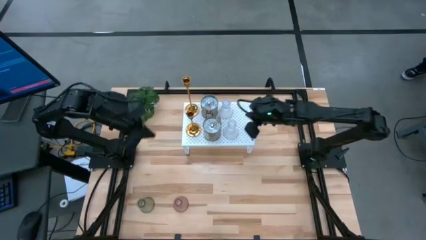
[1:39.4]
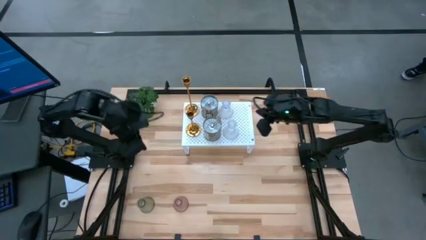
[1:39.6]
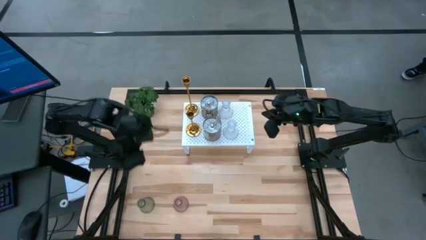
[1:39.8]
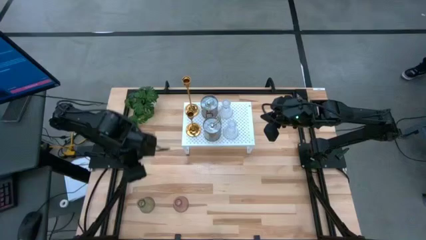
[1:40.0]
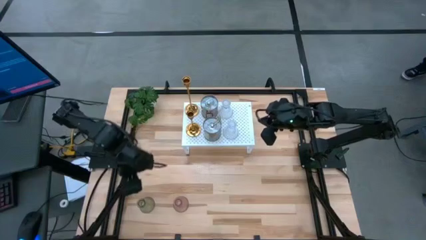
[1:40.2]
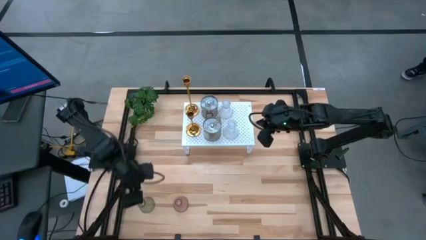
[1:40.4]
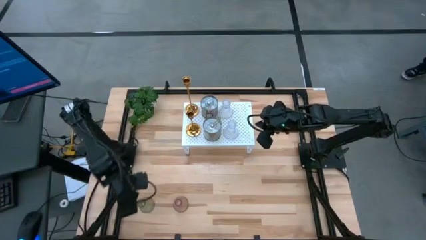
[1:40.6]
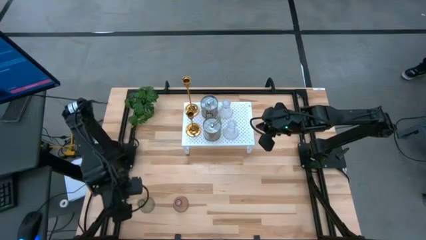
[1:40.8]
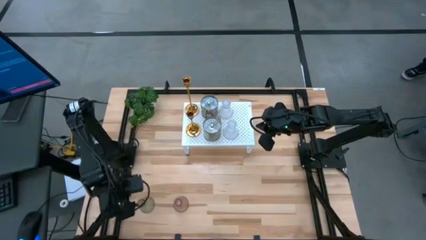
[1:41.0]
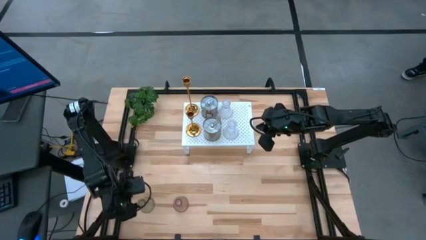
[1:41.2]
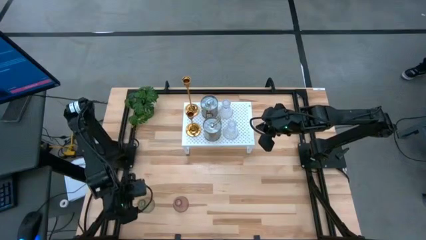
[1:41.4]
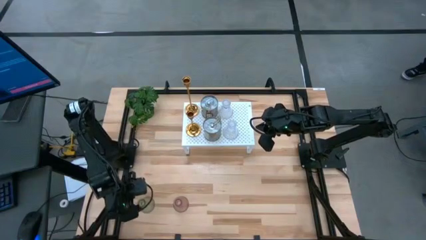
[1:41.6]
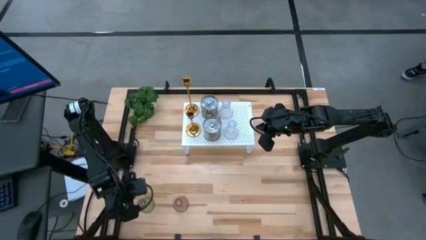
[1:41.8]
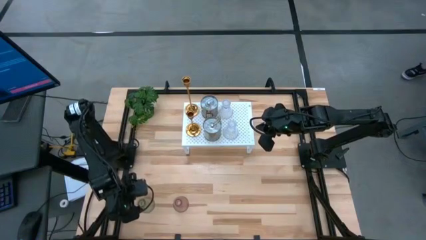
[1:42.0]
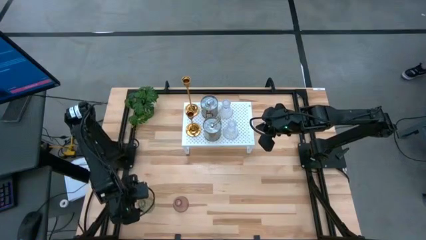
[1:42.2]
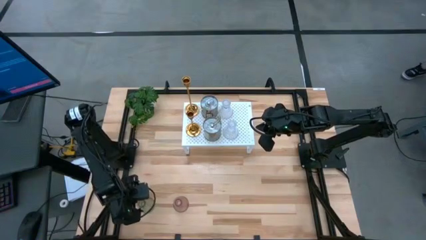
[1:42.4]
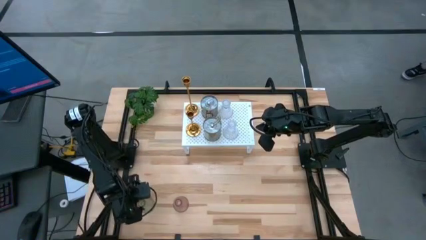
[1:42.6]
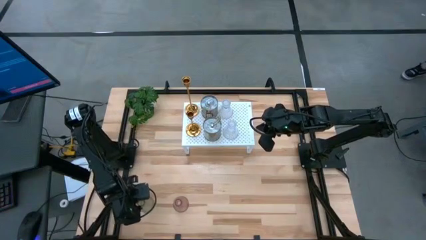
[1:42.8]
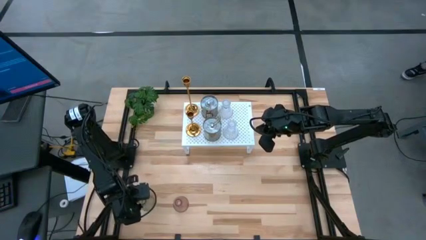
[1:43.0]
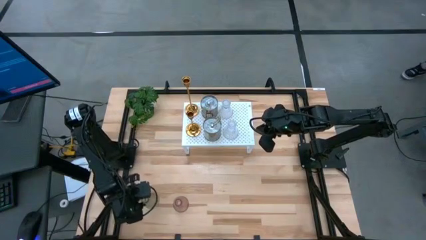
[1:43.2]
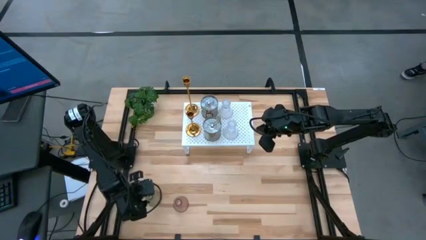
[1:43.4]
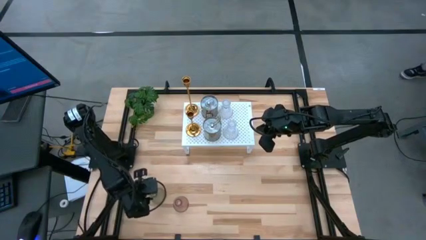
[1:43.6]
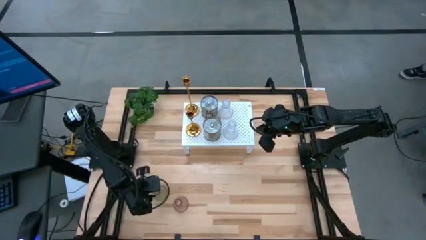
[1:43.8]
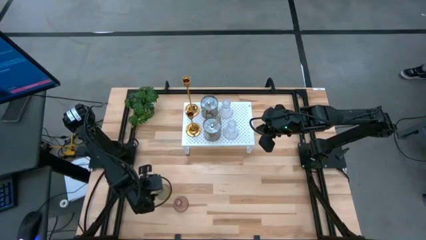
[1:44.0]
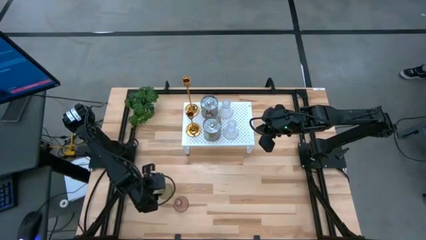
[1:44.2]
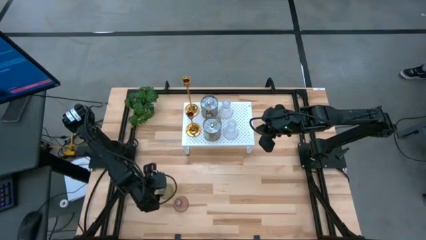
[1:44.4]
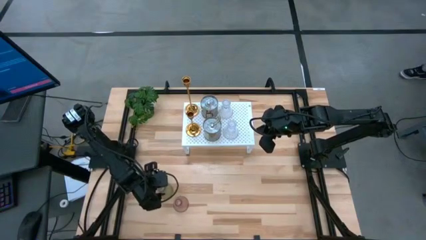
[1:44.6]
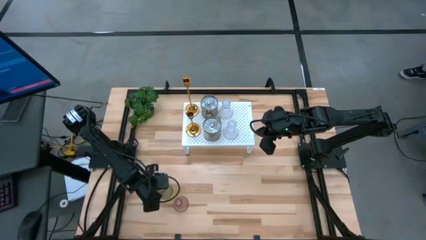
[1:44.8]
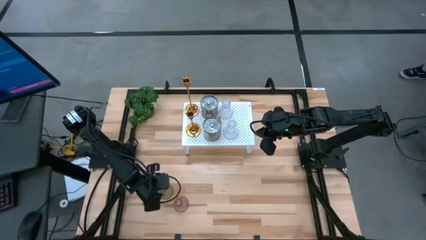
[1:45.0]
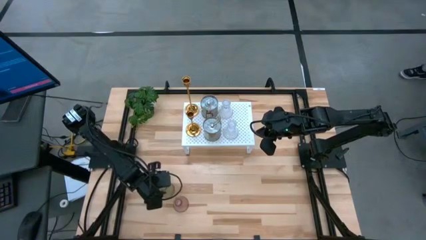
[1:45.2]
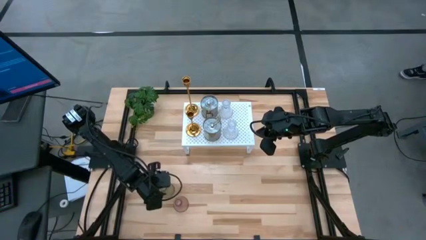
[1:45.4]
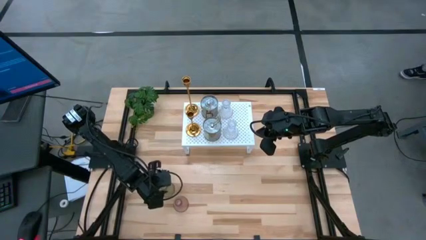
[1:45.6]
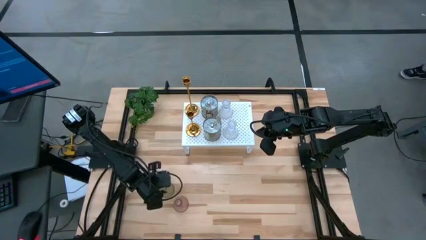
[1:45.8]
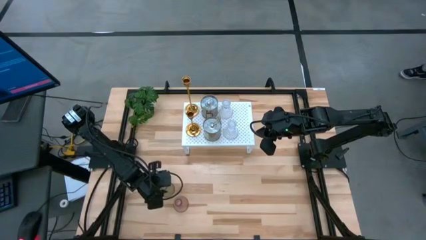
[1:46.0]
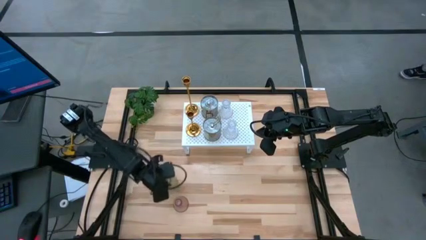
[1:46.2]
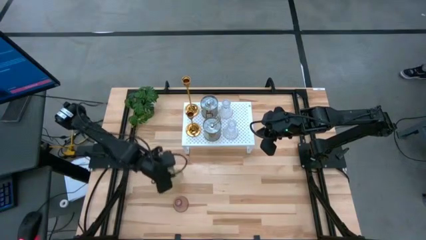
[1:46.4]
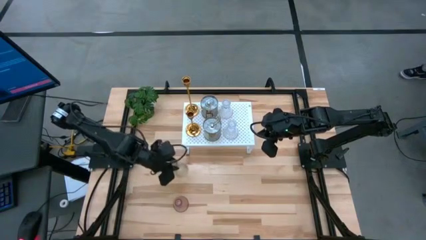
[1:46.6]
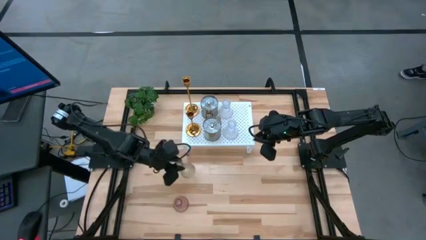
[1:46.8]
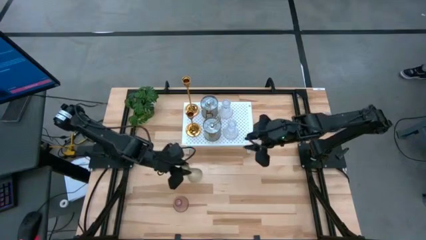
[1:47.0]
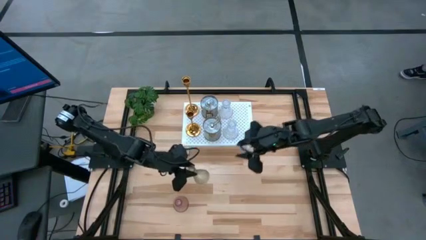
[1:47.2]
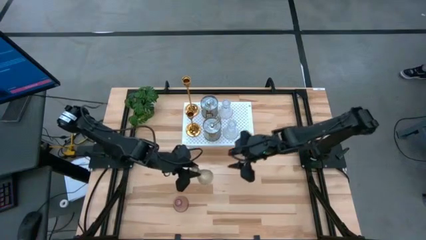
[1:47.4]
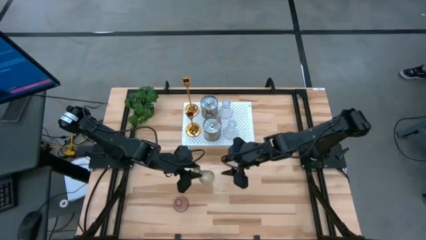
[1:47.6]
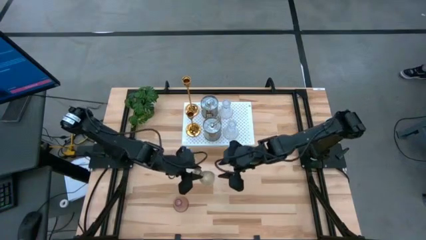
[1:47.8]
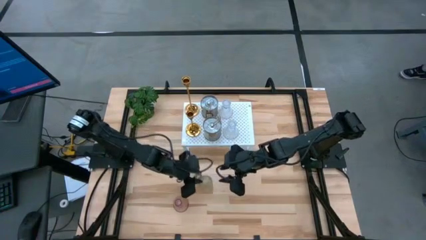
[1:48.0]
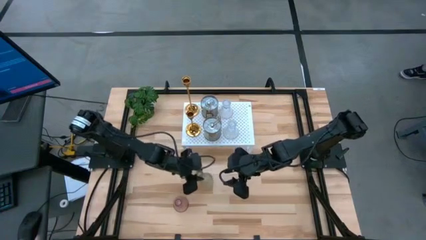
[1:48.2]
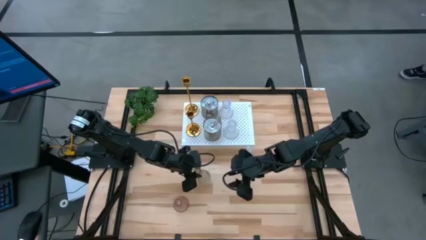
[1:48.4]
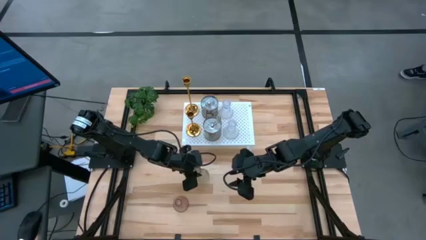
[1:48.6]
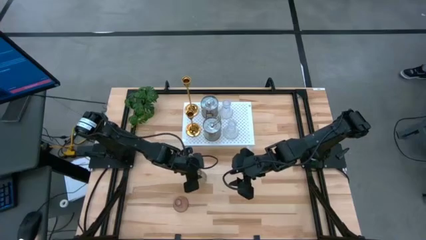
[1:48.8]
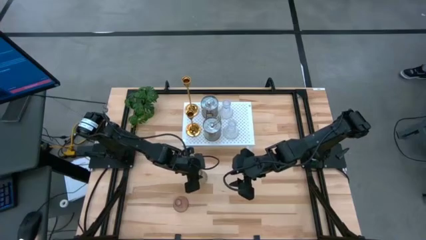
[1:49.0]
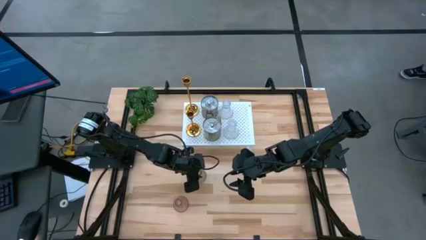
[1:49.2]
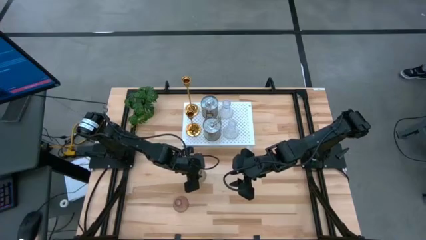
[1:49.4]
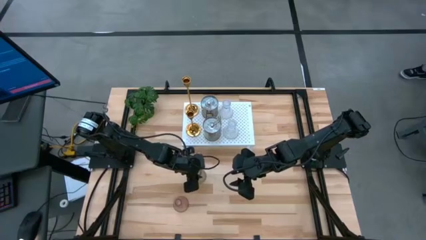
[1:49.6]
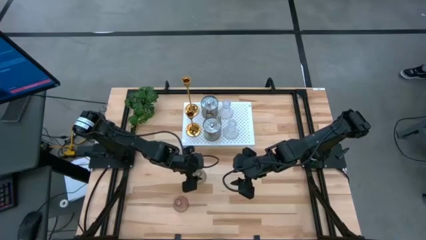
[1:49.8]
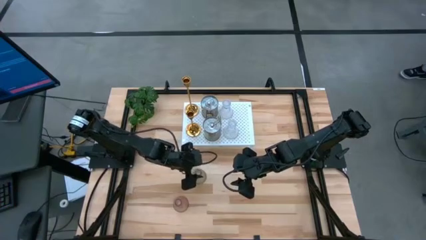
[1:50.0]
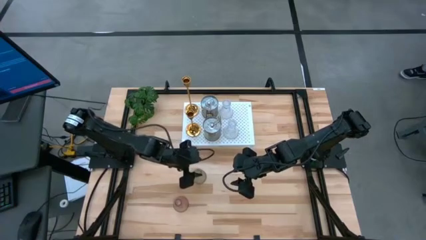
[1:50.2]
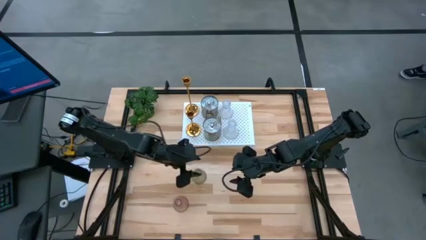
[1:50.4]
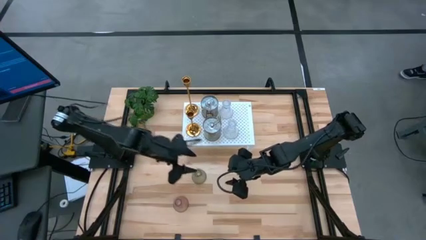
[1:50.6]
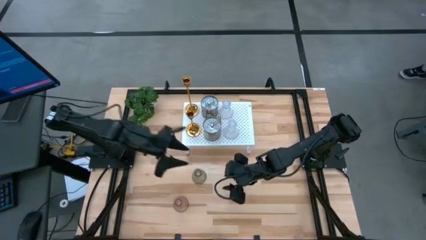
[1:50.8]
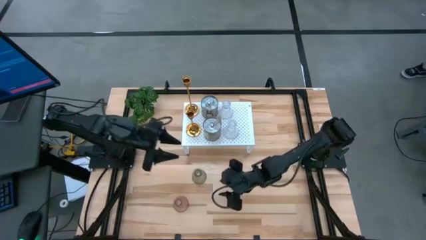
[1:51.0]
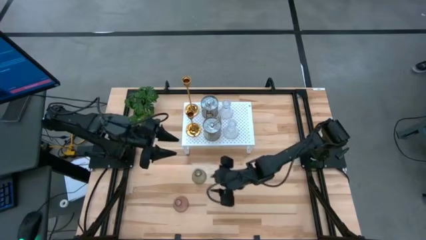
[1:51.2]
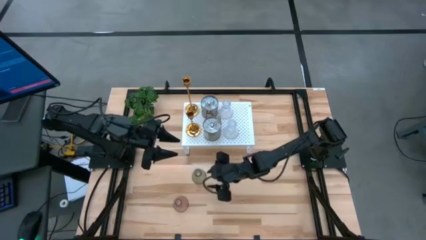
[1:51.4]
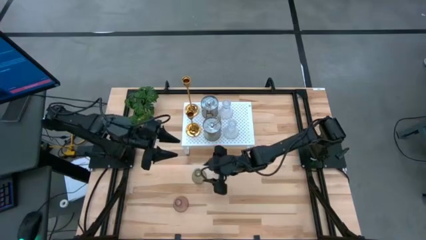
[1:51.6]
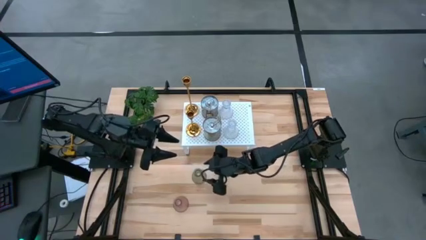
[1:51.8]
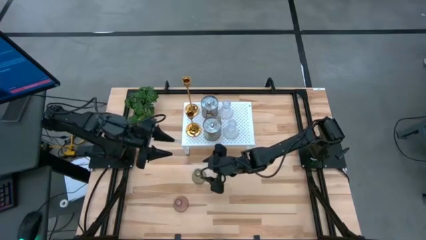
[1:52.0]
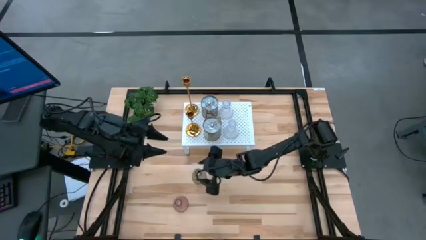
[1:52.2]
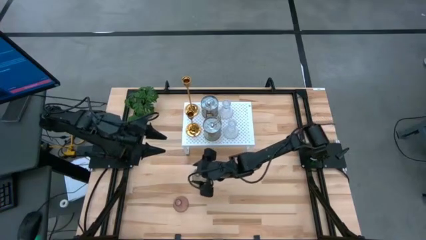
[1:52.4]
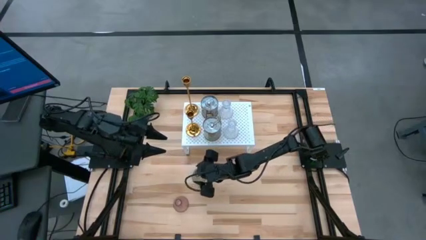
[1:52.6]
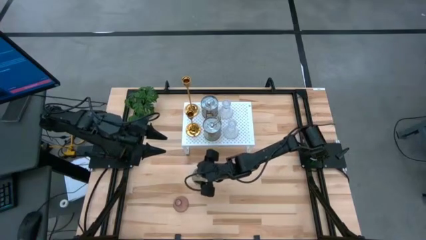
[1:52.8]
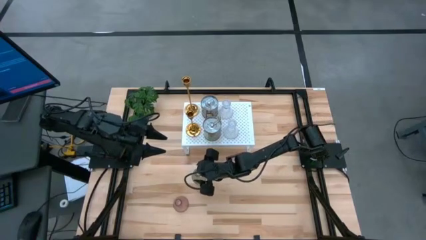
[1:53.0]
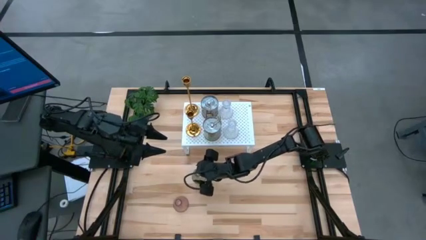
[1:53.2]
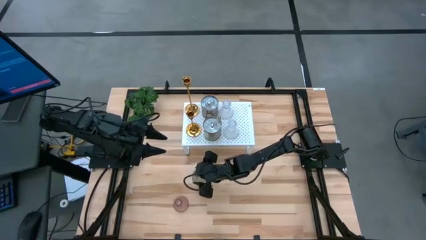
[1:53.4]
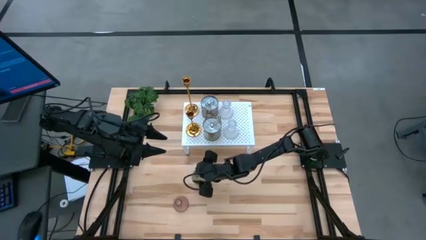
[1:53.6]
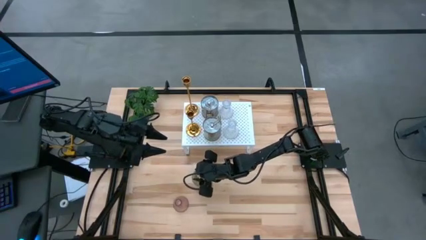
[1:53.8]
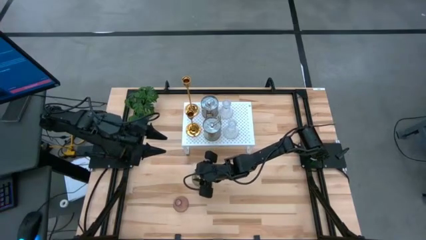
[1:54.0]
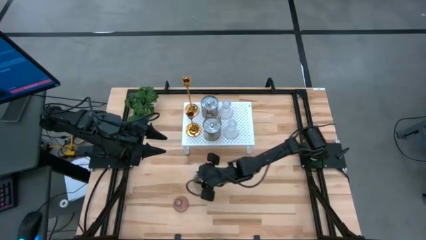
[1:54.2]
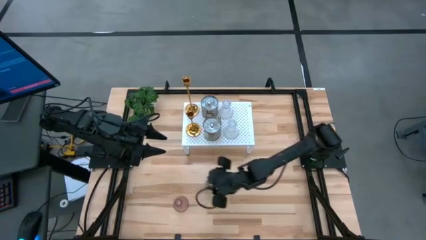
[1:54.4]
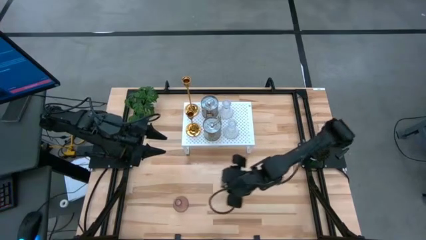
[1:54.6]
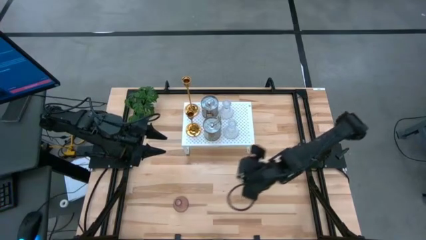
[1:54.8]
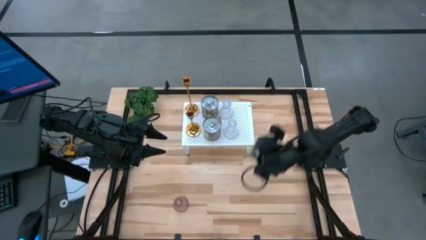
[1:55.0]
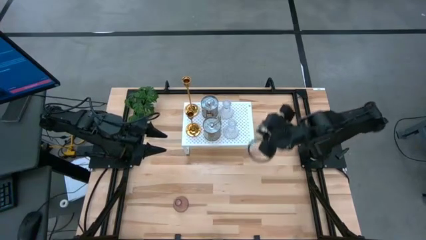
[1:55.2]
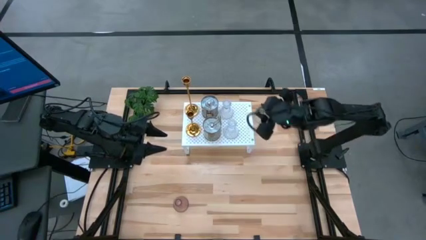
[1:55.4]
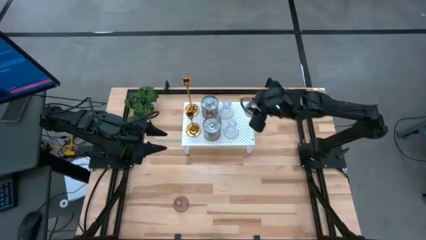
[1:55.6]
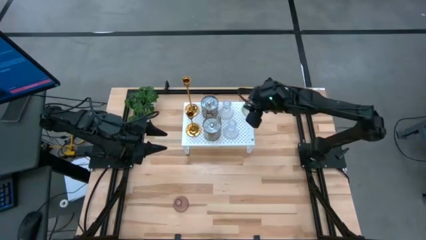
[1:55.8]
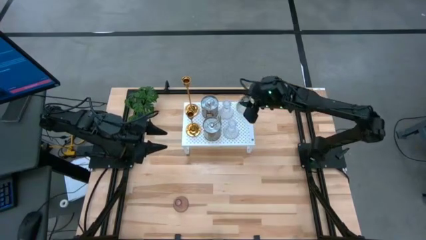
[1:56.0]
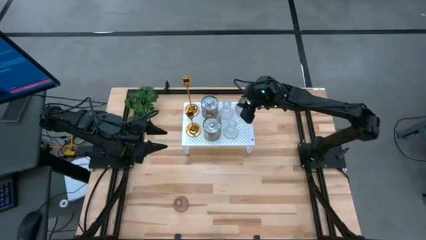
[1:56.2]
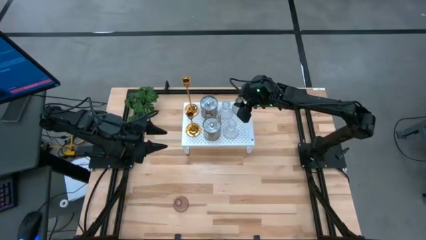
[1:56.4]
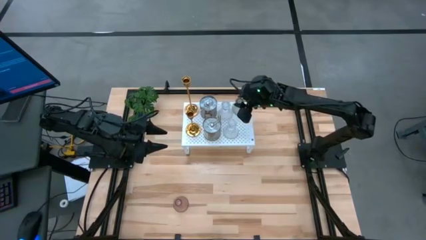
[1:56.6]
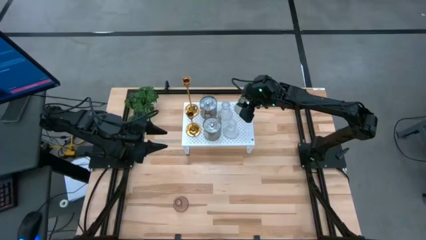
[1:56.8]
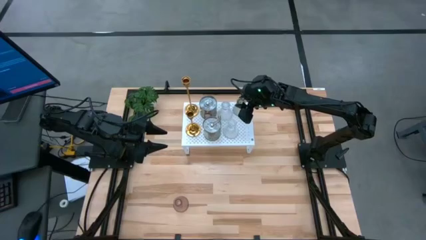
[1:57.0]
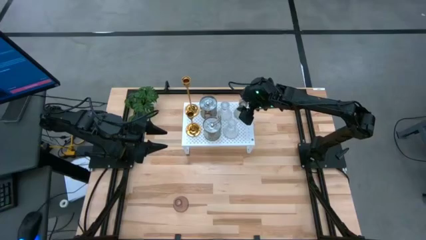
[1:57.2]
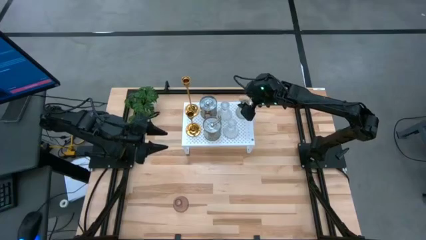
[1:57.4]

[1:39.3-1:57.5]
Task: Pick & Place candle stick holders
Put the green glass candle holder on the shelf
